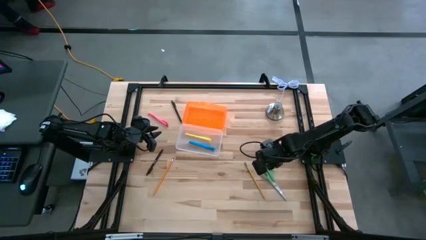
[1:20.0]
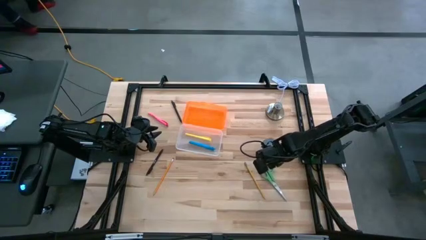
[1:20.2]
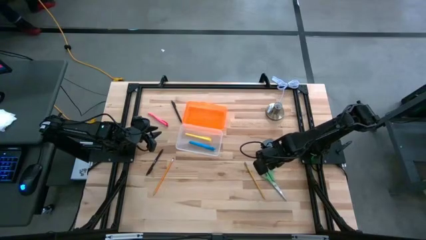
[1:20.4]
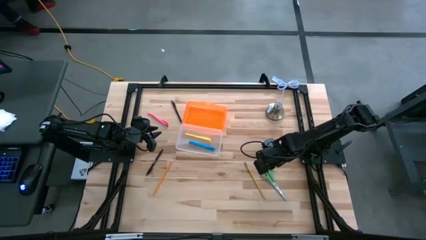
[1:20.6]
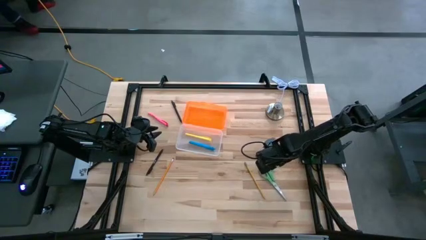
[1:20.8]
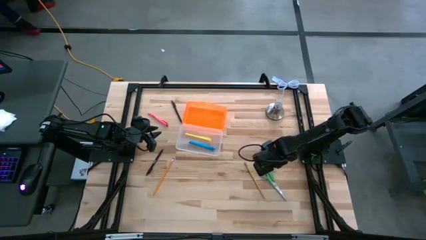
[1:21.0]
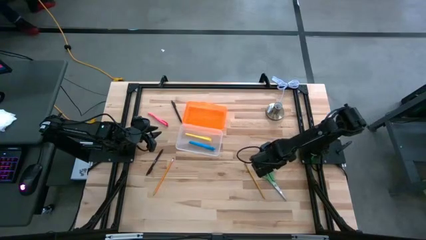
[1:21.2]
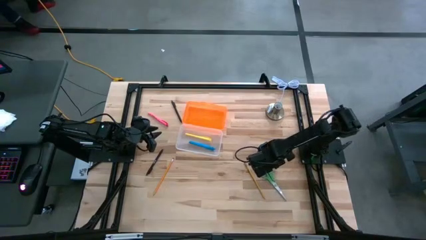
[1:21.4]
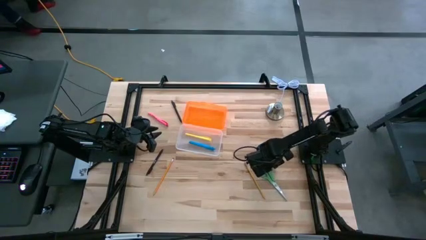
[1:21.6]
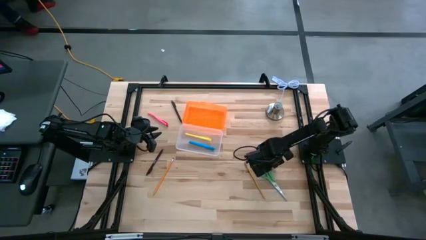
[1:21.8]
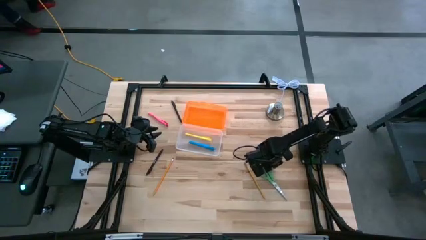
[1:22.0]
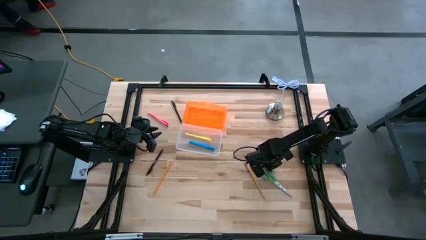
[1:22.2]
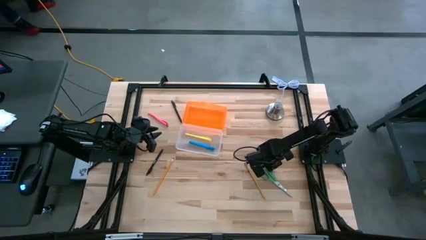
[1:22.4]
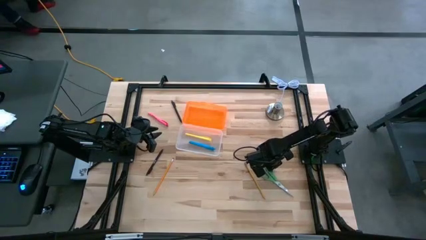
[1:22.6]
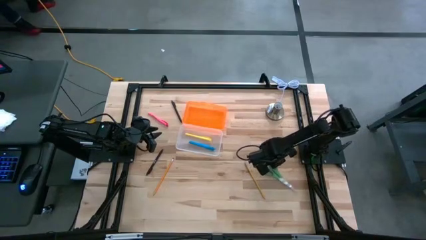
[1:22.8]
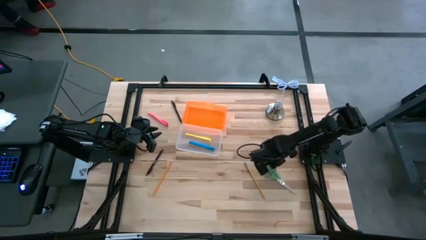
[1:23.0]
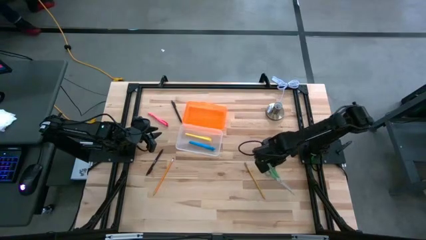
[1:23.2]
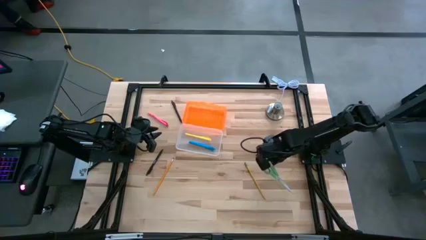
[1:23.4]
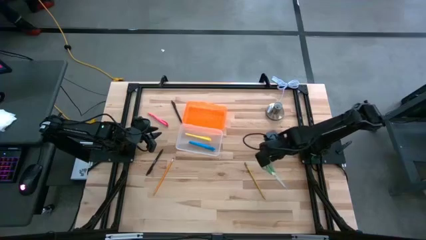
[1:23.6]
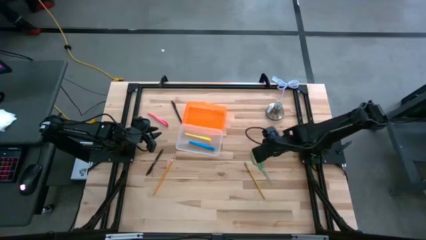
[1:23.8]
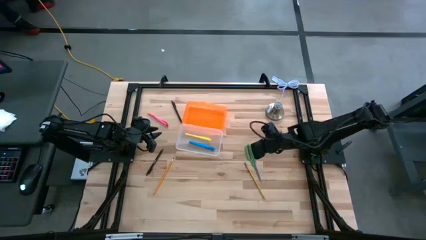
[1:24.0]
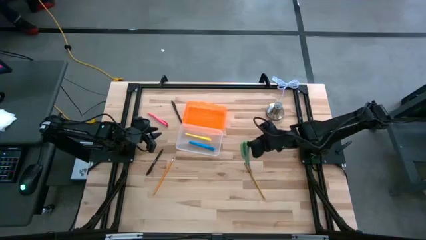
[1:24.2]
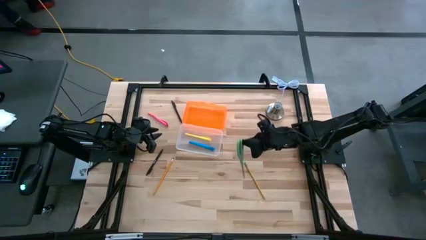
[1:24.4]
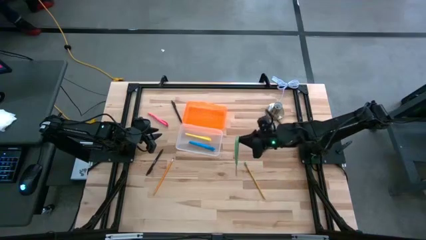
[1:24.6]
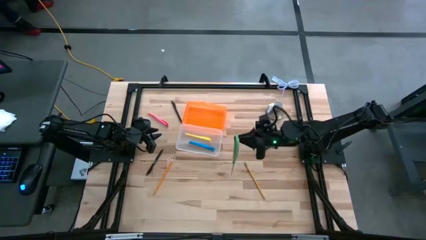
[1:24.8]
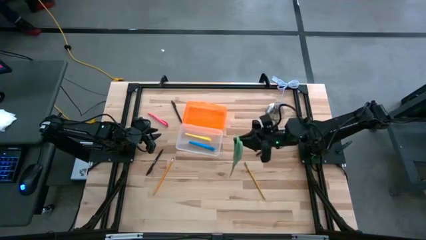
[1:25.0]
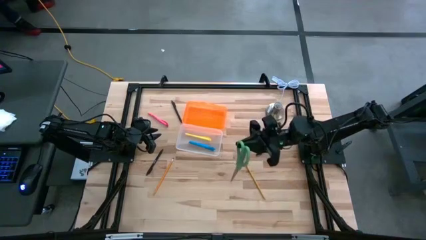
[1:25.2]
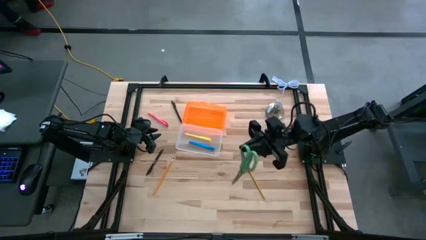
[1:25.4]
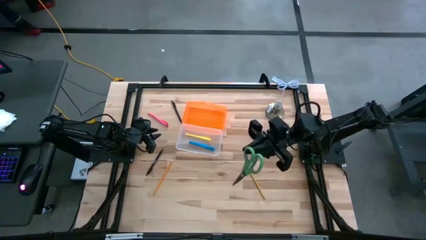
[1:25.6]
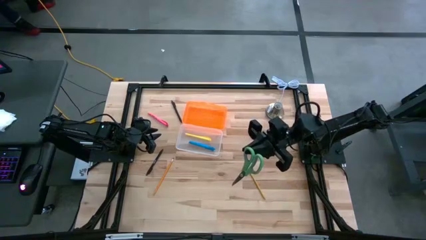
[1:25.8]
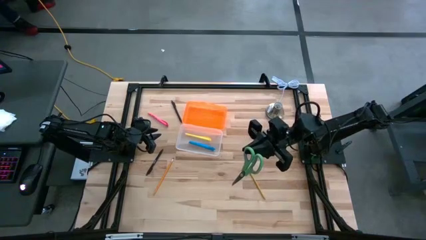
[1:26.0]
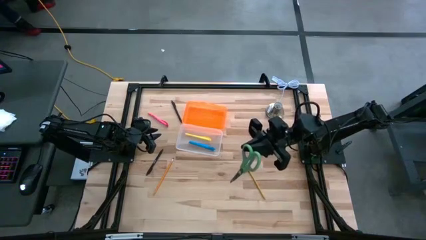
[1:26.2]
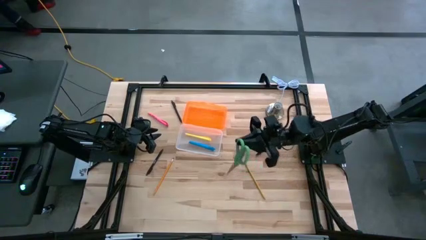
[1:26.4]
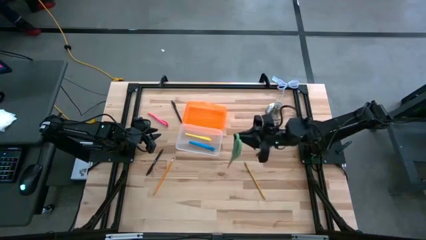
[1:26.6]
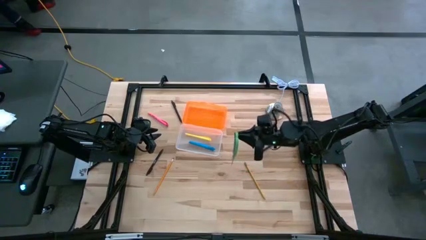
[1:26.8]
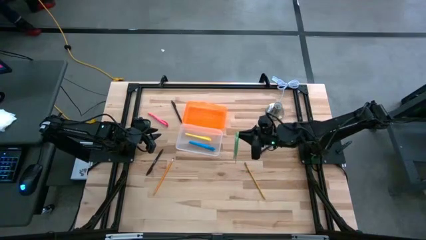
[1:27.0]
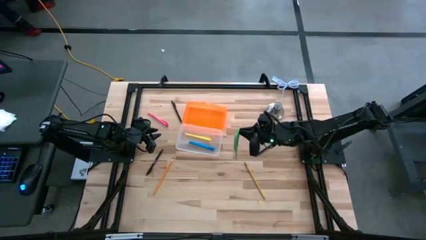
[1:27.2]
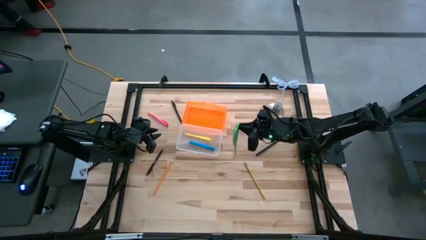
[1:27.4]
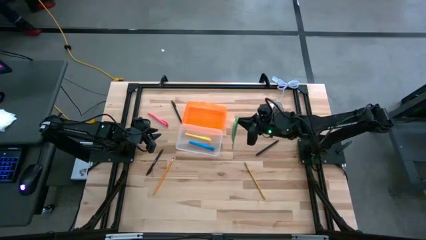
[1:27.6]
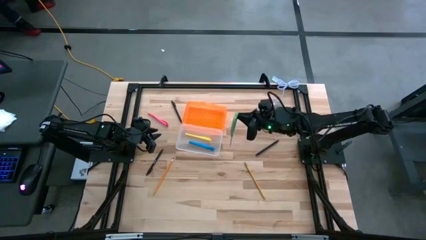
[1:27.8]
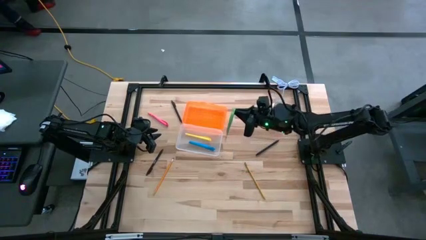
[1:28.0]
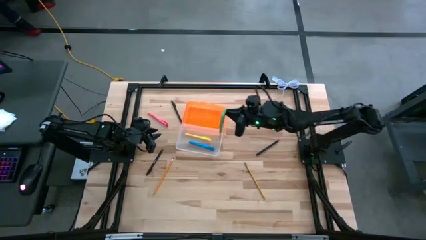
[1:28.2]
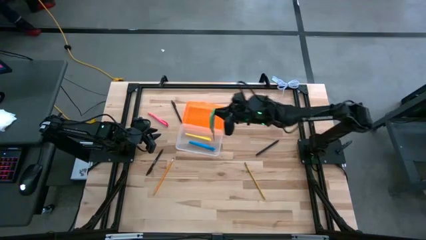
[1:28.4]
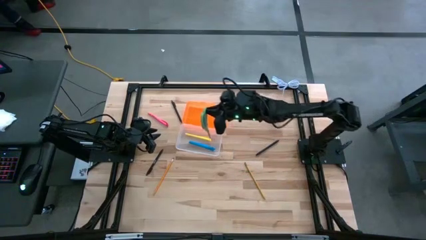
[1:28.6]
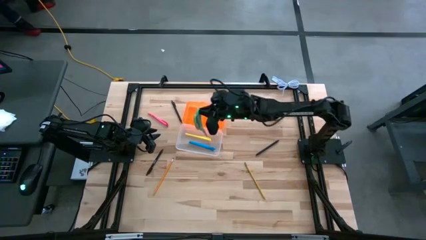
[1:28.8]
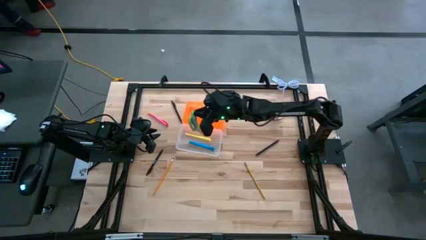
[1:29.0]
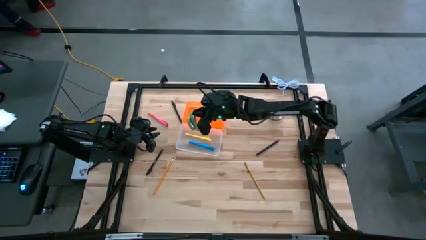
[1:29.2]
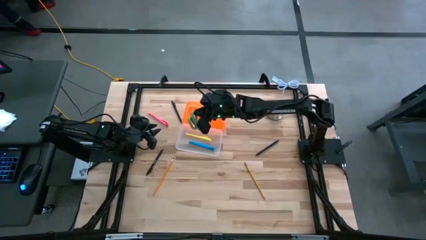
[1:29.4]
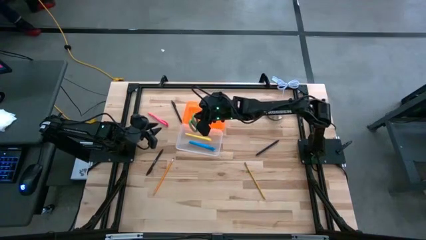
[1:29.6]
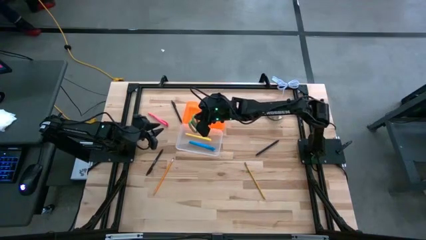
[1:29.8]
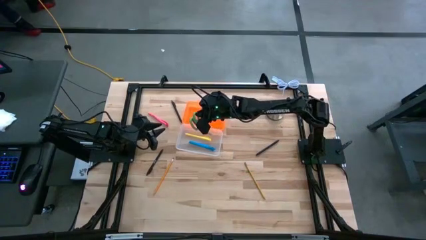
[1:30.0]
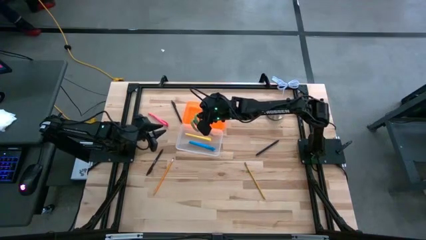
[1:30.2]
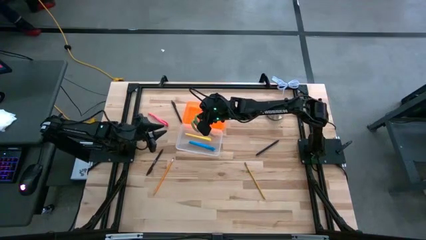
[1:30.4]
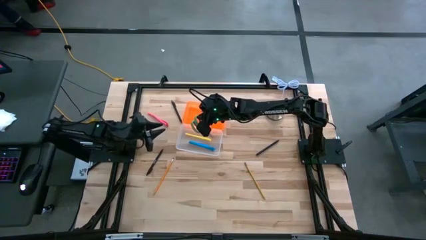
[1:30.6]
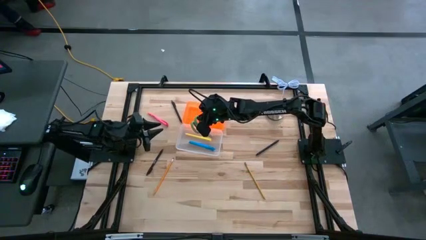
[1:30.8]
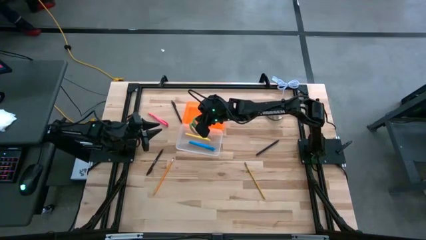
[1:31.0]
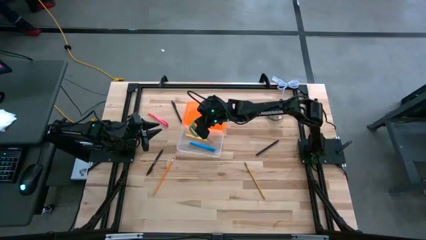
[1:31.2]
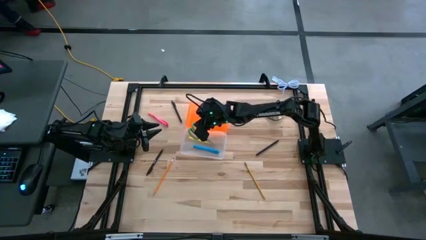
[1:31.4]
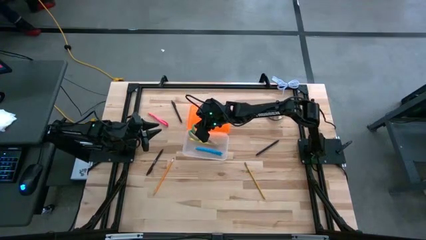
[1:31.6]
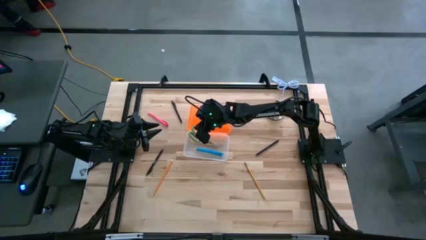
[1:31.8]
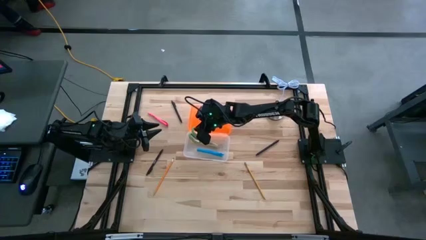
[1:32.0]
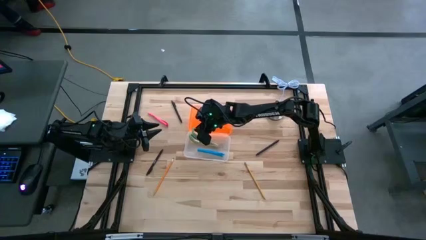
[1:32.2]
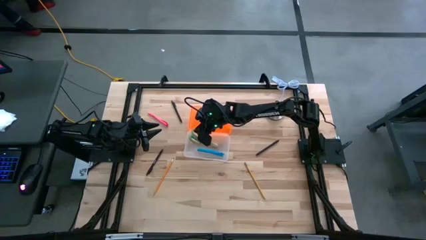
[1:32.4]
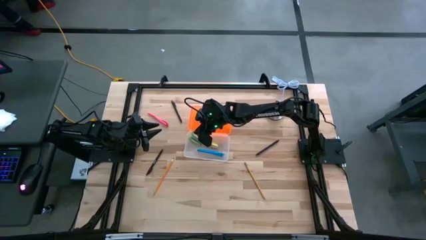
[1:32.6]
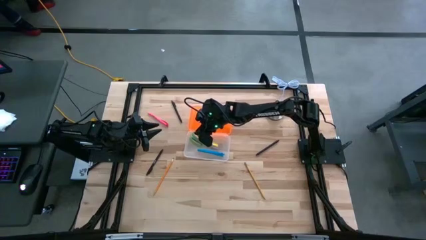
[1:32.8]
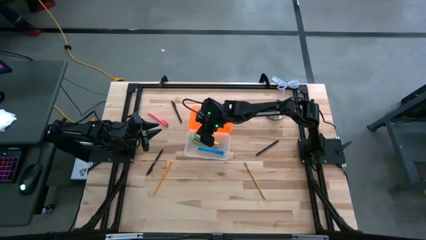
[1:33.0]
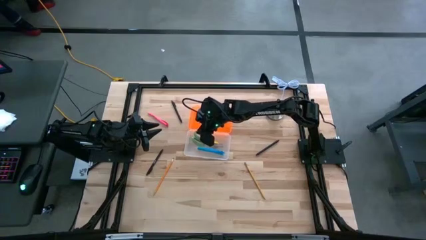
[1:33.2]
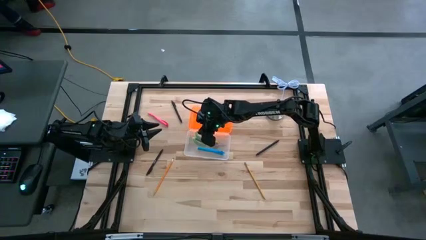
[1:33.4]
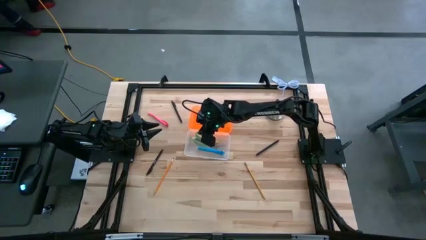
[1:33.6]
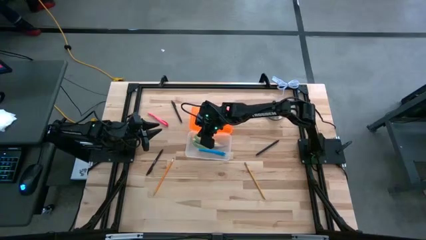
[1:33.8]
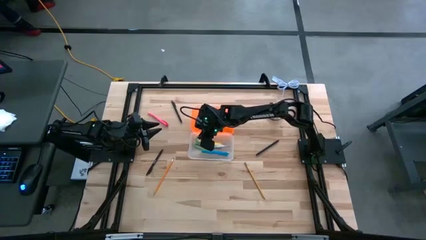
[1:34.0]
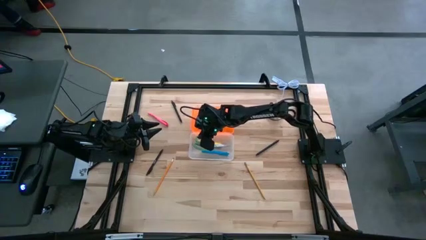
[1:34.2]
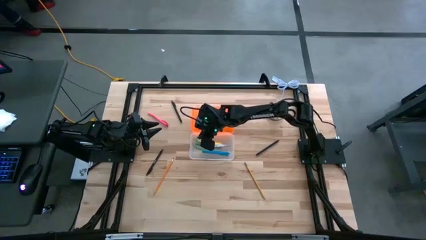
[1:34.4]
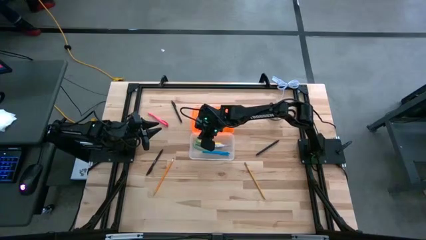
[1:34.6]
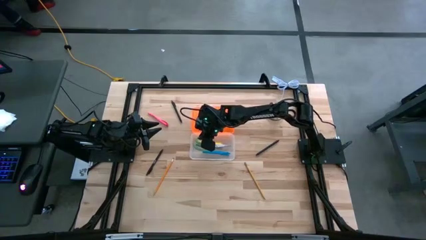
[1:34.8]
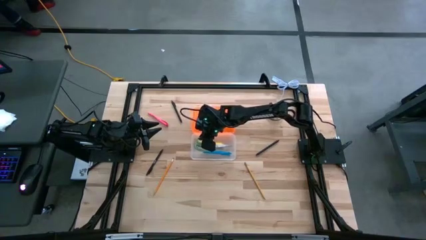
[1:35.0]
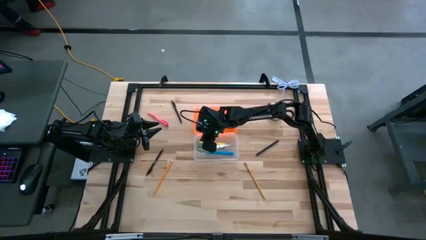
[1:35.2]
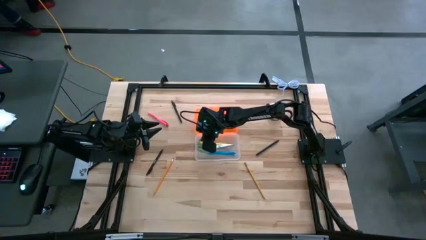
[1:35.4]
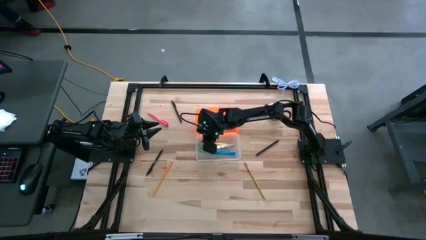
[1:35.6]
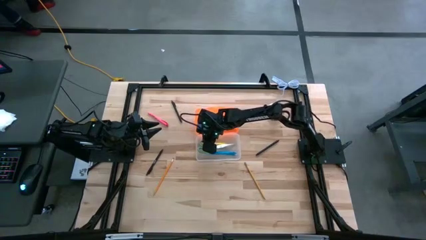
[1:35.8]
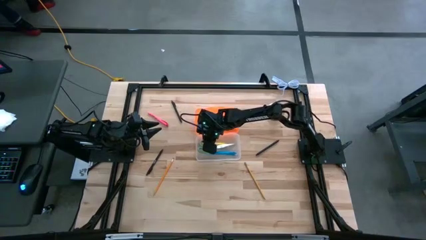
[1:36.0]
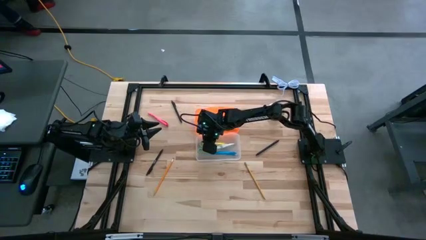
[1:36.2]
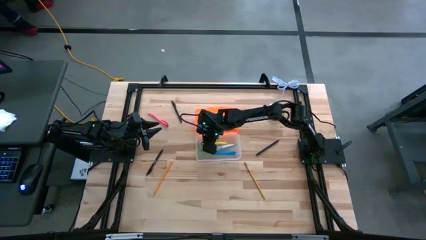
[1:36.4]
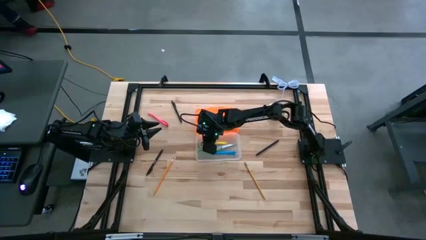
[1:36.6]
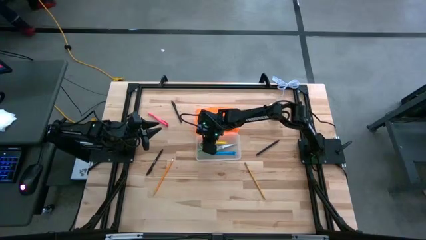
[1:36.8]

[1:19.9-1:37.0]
Task: Pick & place school supplies into a supply box
Put the green scissors into the orange supply box
